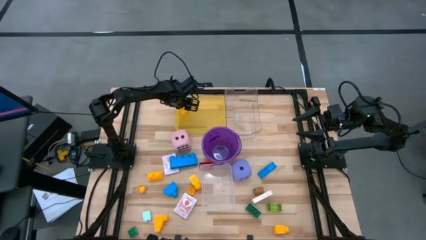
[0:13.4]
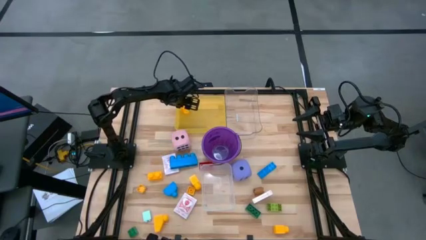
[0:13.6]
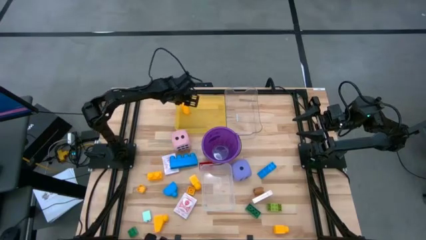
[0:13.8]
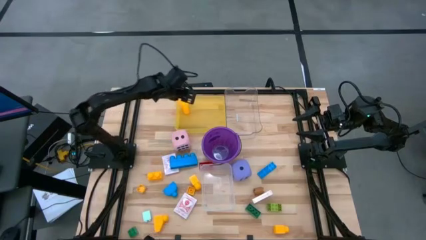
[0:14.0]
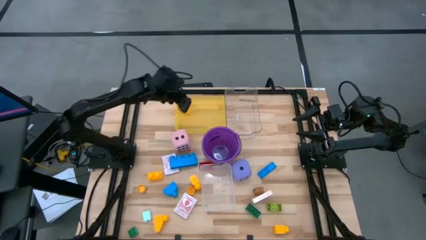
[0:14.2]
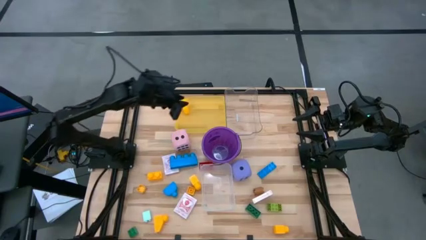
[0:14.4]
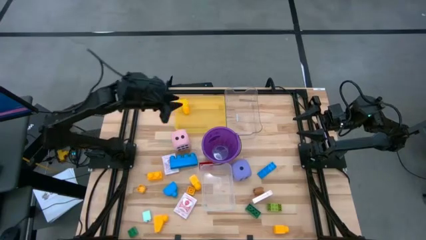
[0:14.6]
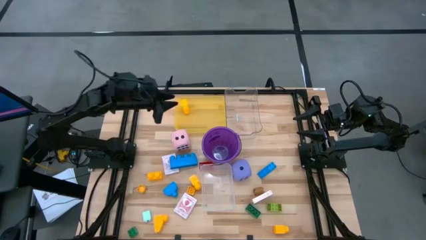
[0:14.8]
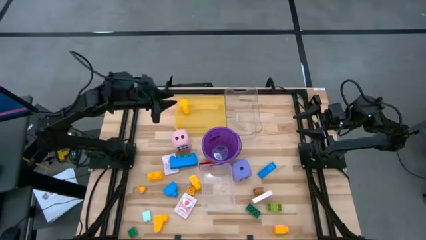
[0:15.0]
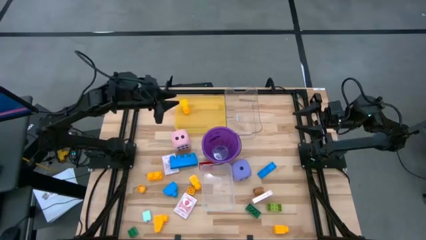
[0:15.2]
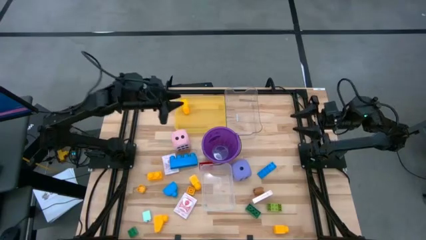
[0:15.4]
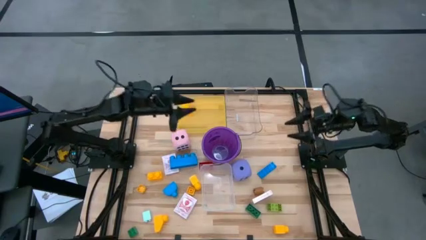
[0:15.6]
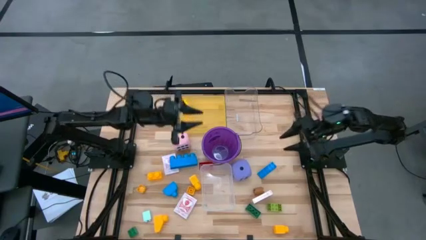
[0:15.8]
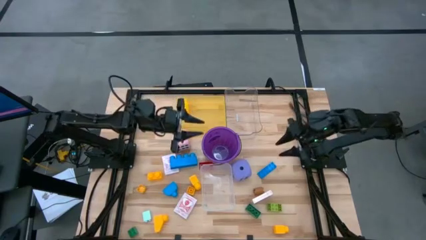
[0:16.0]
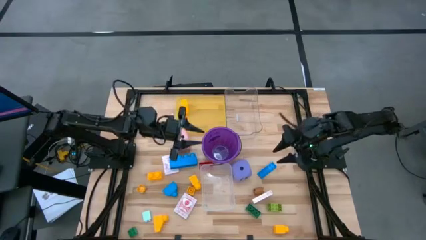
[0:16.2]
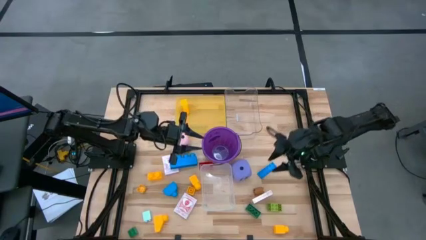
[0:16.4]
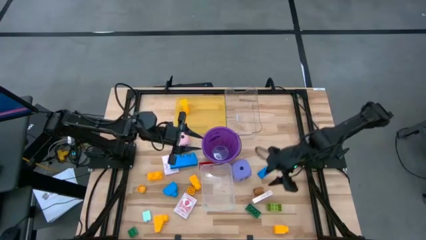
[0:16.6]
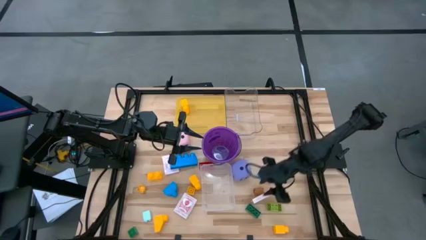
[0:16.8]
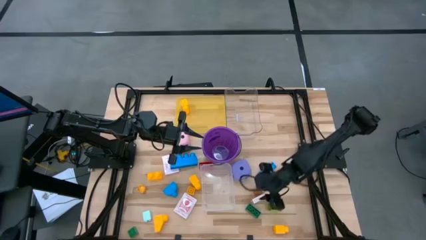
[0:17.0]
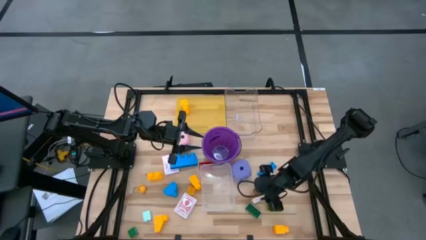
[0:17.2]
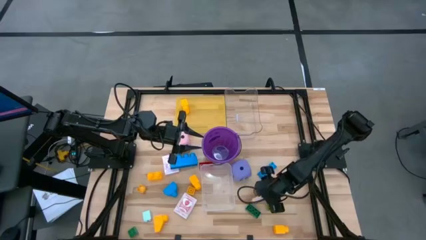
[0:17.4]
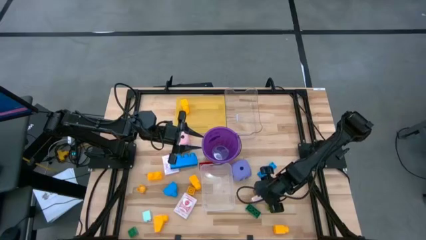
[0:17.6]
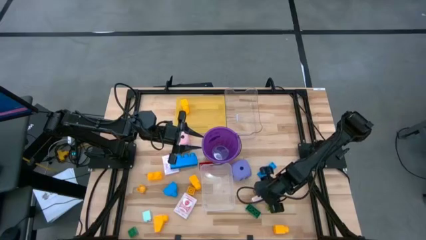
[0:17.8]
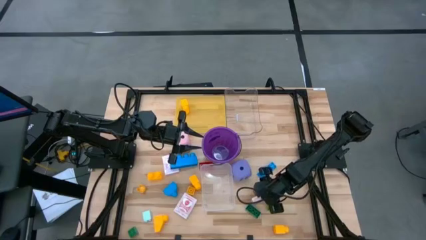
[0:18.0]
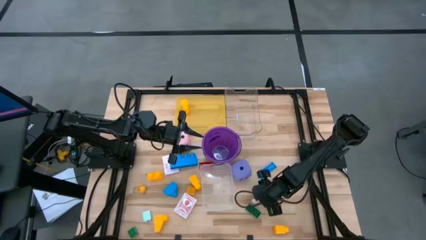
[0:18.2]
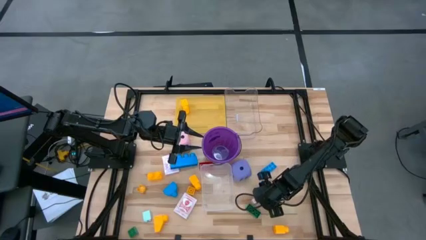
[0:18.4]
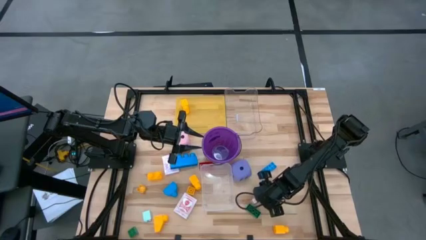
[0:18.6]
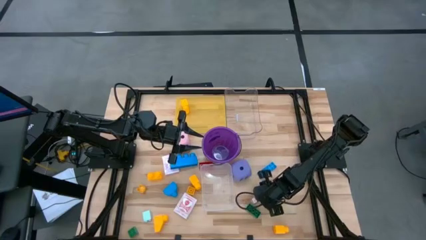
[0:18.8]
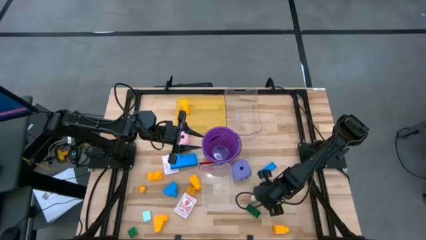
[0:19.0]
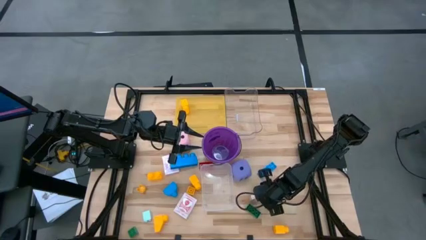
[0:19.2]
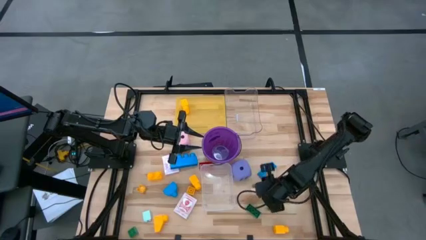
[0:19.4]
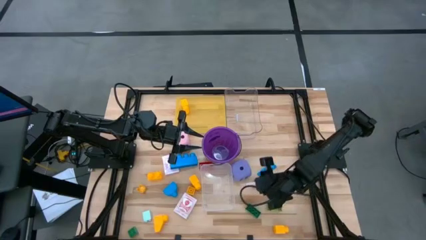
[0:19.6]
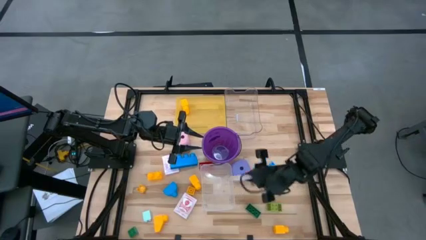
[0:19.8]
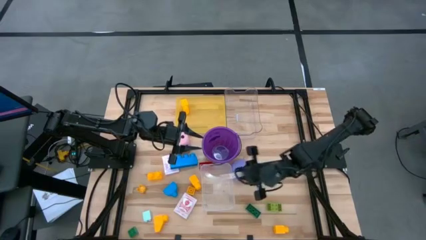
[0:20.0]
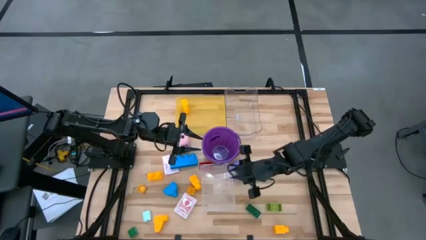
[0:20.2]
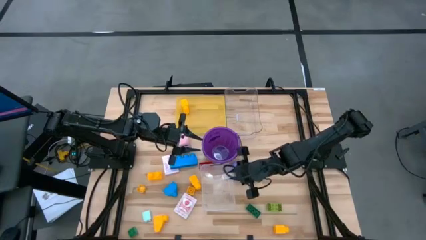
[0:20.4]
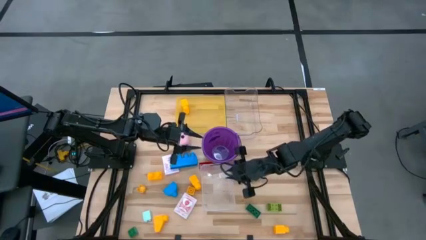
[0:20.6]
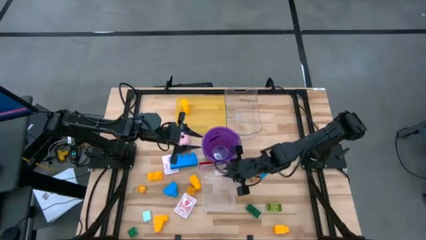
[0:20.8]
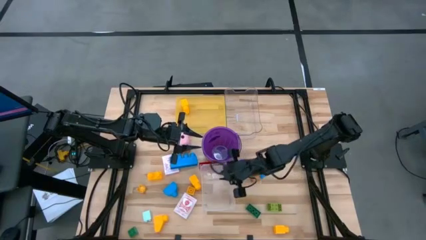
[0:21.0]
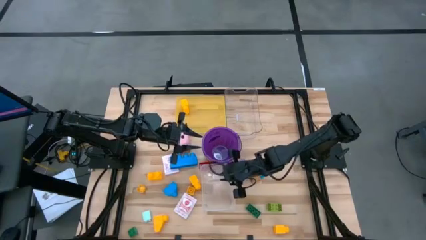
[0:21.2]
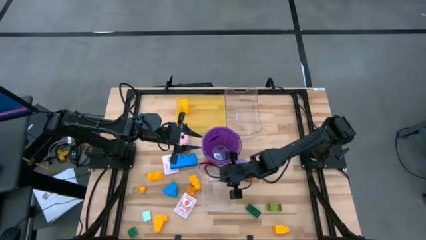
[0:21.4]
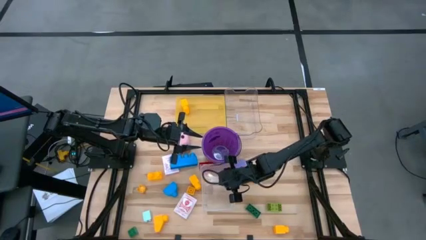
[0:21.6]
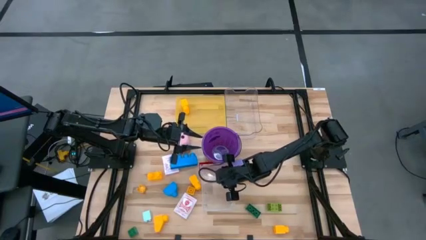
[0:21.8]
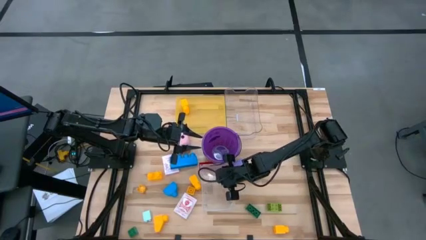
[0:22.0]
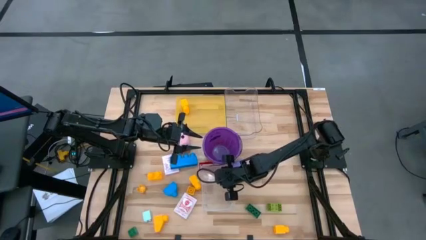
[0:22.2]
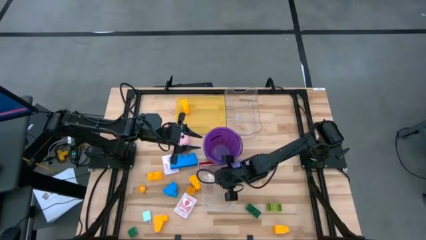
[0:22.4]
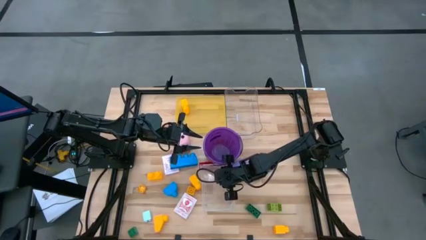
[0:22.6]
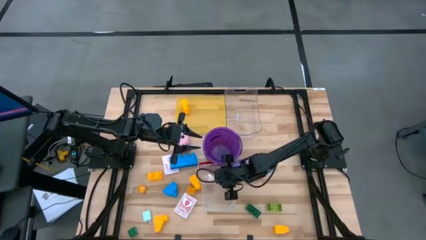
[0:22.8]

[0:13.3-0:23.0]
Task: Pick & Place Toys
Put the orange deck of cards into the bottom transparent bin

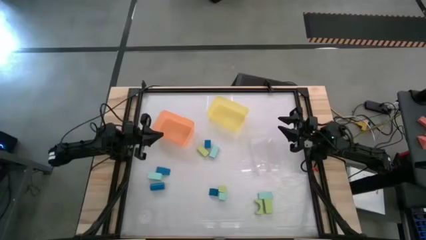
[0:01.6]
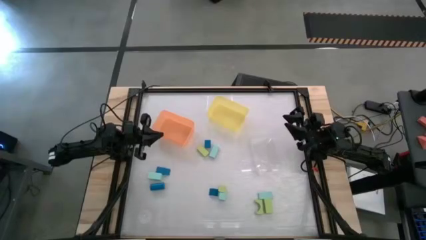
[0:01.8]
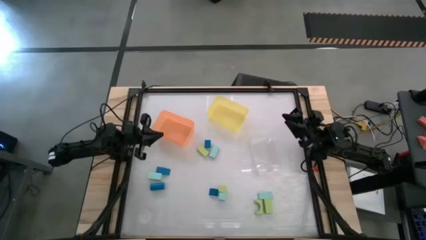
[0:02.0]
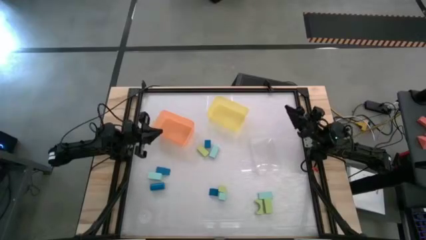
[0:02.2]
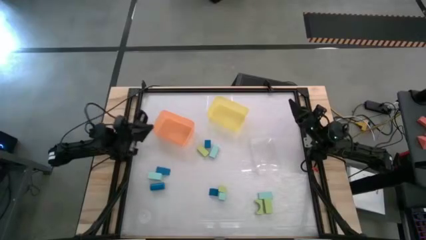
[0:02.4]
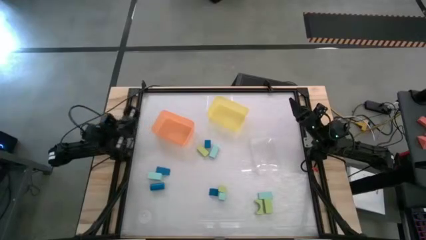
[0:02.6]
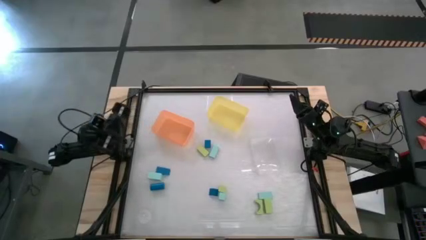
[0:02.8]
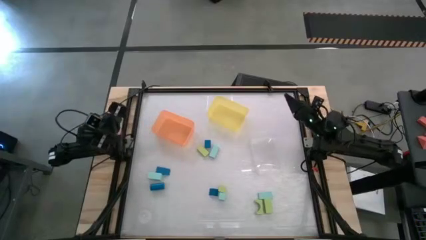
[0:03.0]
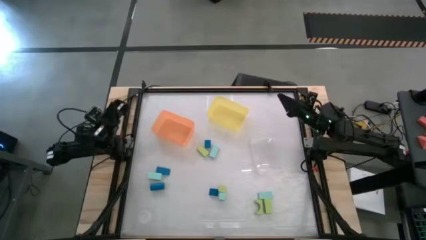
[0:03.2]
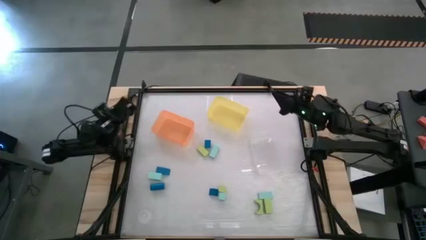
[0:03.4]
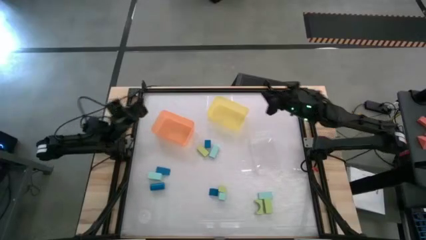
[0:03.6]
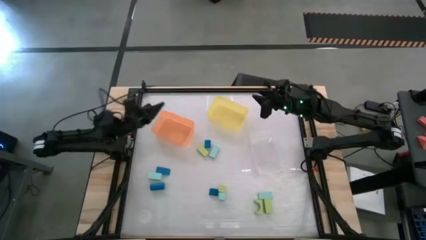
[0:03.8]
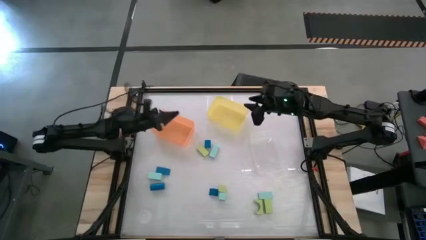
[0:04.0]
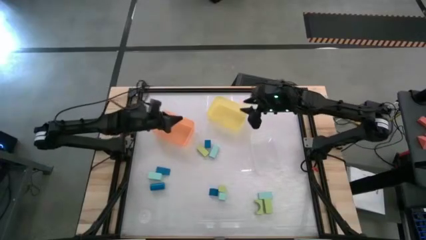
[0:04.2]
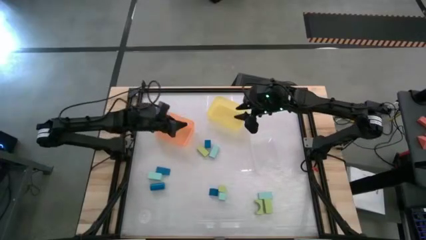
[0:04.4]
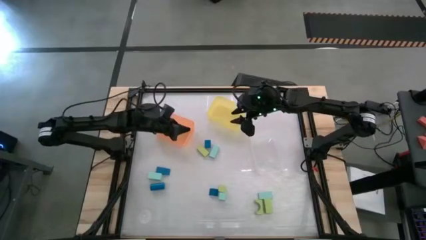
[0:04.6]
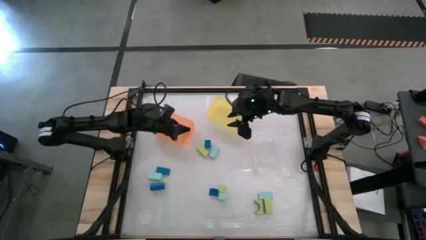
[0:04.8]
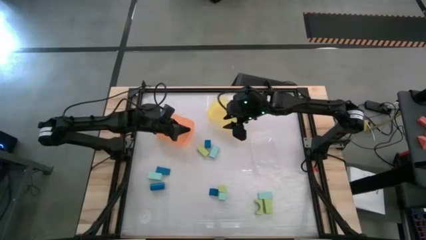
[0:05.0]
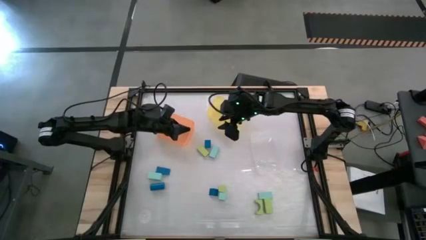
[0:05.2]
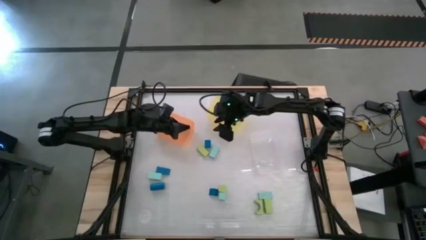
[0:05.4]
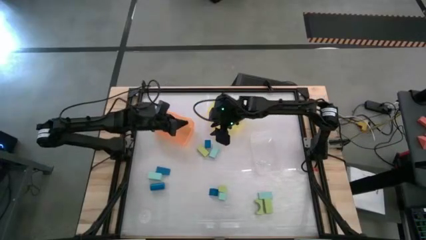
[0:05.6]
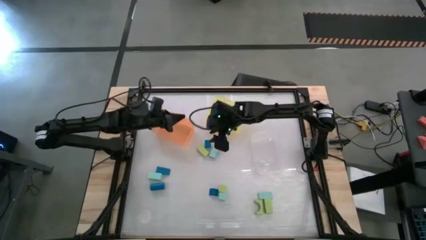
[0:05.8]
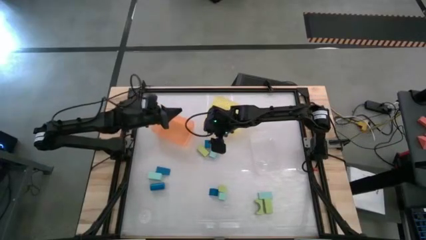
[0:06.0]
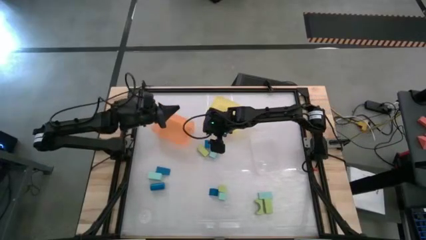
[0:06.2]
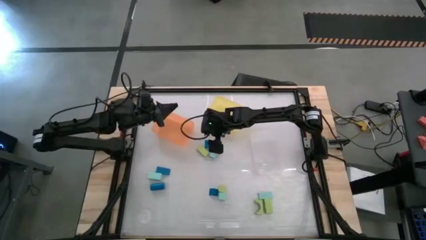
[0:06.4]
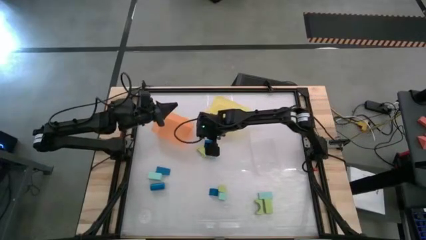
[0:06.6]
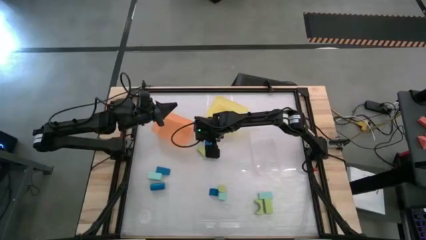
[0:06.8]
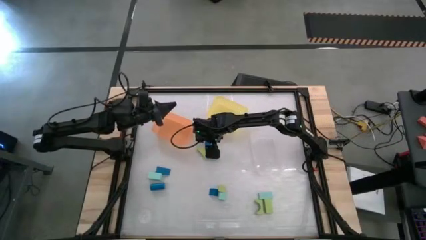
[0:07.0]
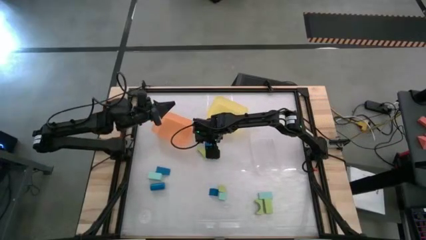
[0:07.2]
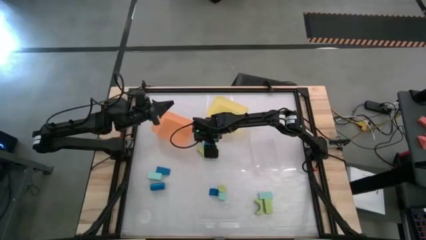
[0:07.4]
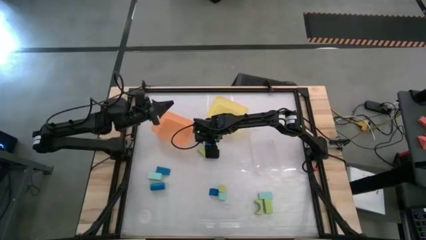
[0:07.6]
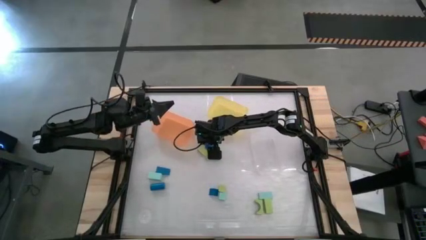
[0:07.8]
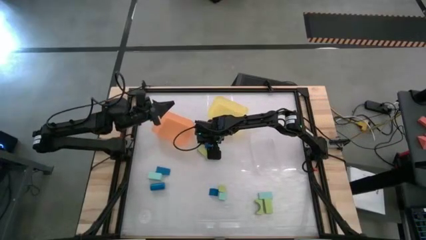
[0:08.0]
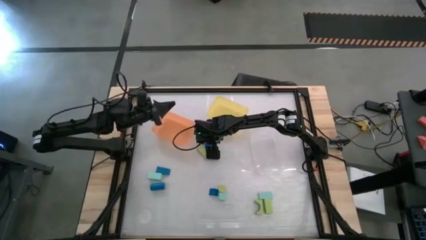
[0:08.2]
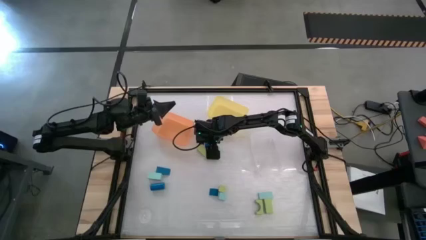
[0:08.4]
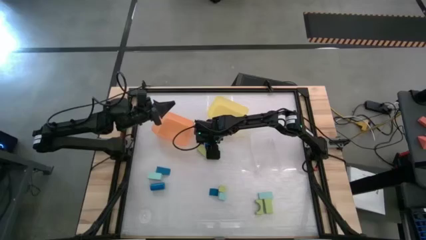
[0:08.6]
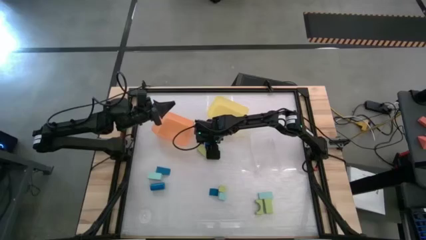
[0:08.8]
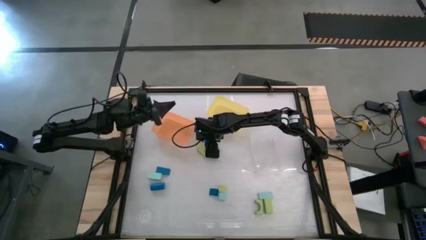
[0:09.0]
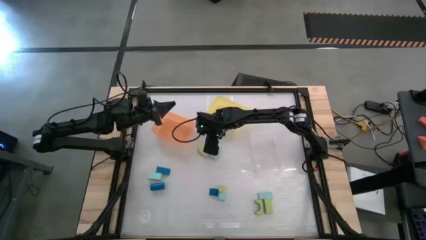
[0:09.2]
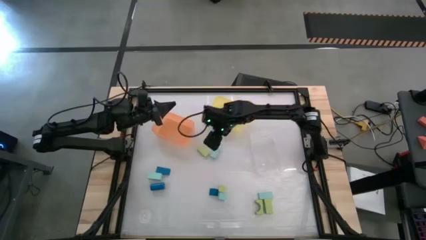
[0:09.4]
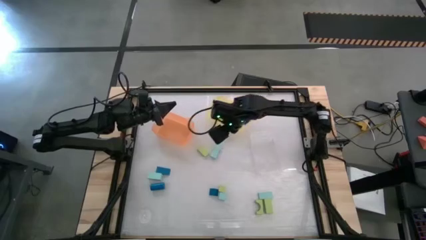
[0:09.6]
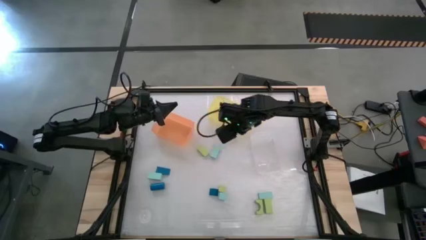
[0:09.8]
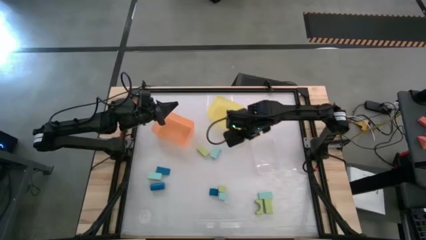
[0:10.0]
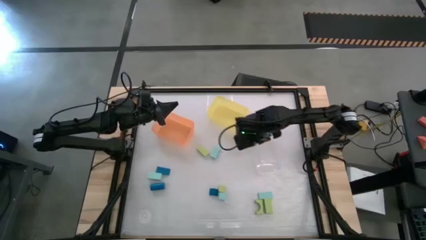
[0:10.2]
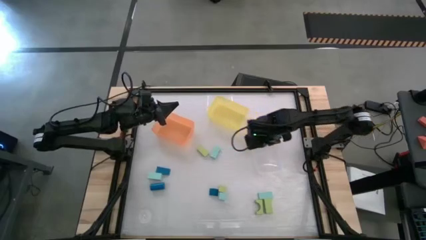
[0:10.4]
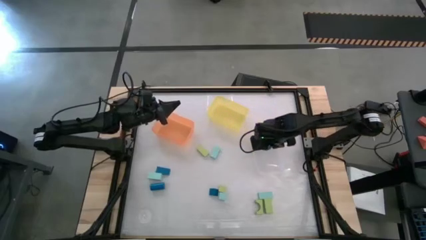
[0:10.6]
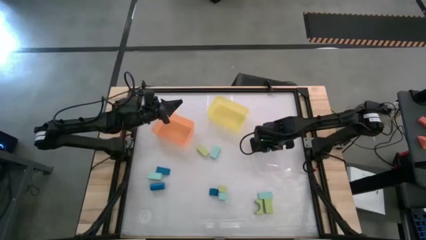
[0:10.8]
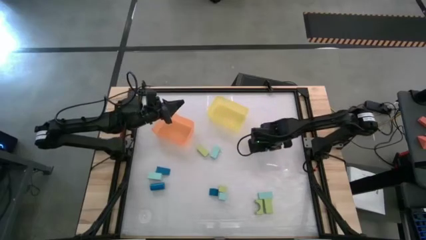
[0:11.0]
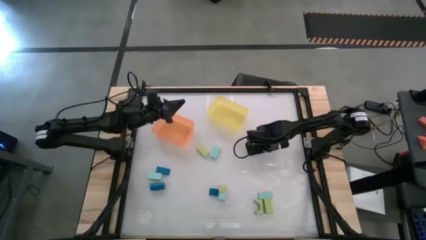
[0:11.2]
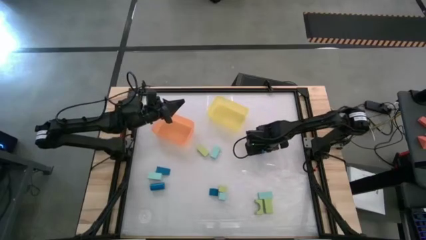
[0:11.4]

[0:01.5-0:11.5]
Task: Sort & place blocks by color
Put the blue block into the transparent bin
